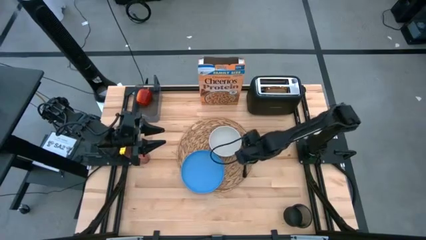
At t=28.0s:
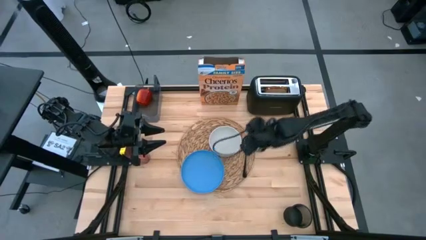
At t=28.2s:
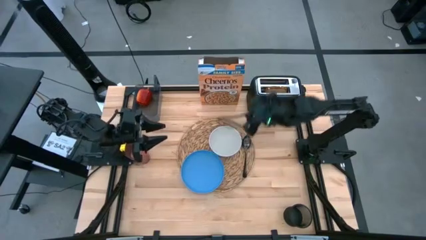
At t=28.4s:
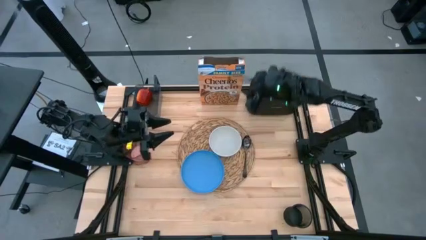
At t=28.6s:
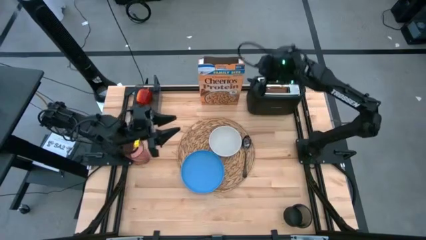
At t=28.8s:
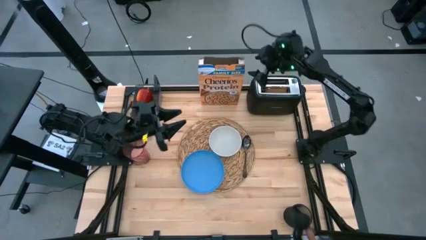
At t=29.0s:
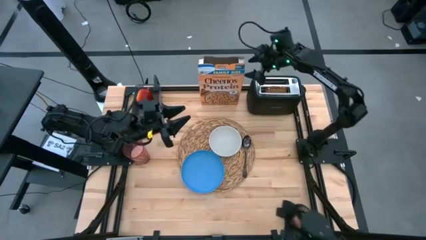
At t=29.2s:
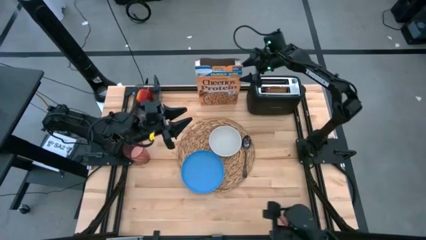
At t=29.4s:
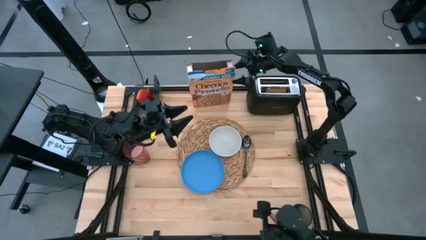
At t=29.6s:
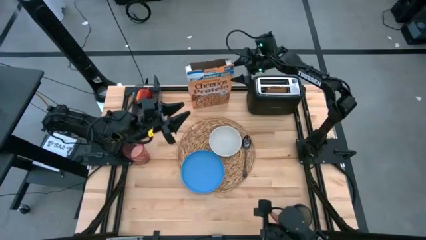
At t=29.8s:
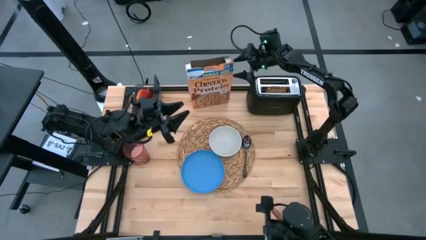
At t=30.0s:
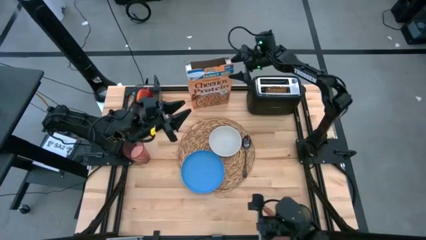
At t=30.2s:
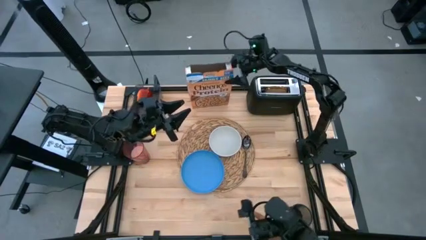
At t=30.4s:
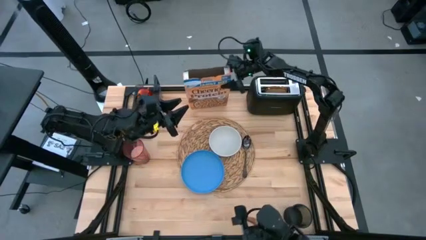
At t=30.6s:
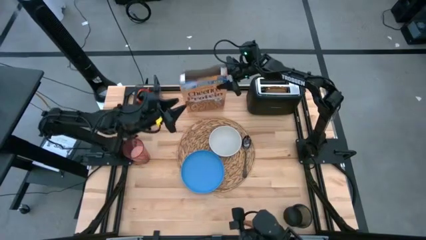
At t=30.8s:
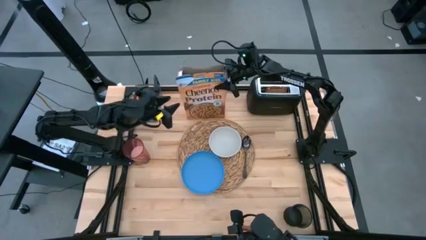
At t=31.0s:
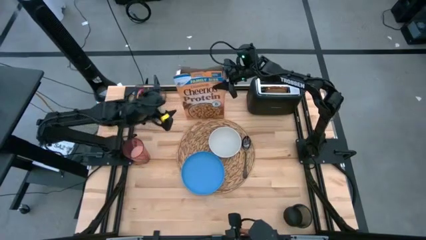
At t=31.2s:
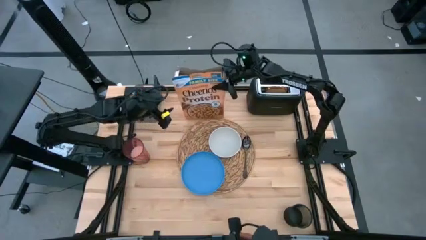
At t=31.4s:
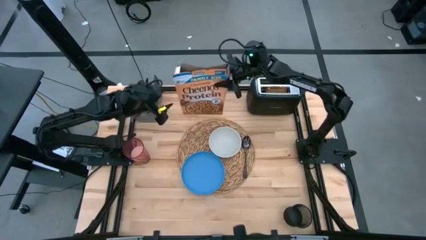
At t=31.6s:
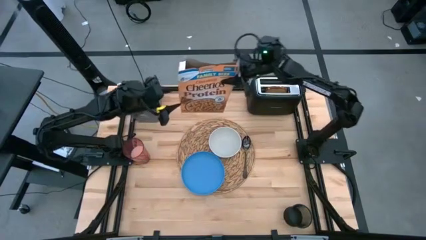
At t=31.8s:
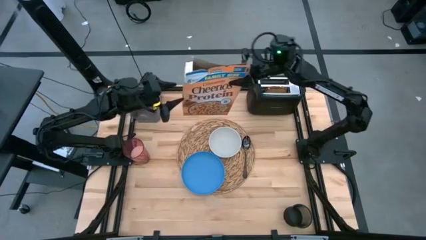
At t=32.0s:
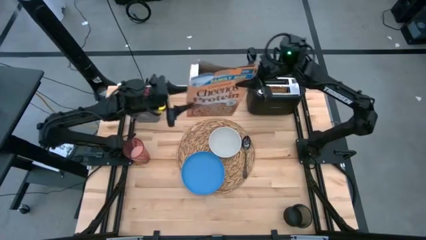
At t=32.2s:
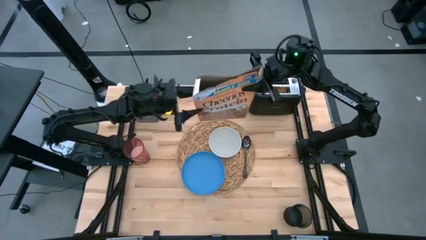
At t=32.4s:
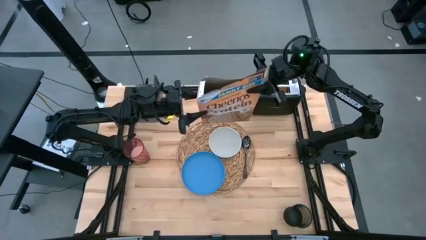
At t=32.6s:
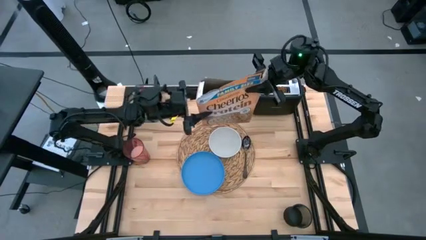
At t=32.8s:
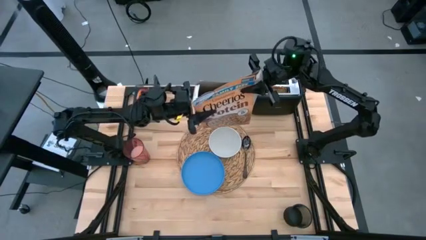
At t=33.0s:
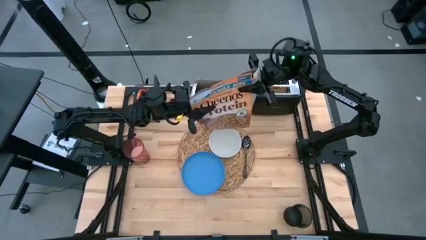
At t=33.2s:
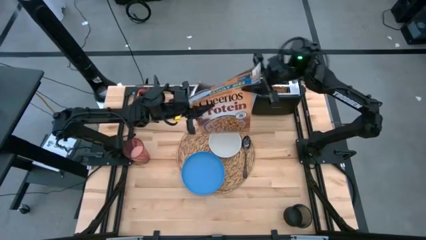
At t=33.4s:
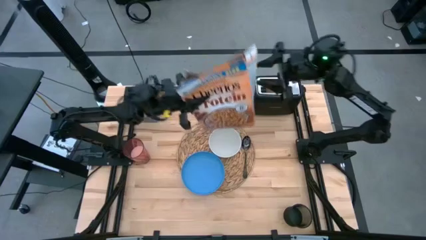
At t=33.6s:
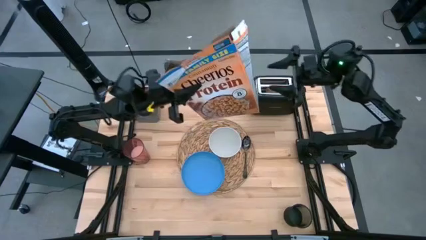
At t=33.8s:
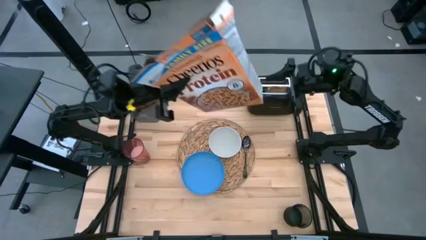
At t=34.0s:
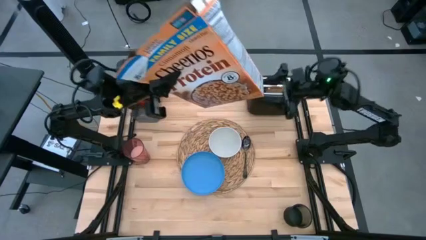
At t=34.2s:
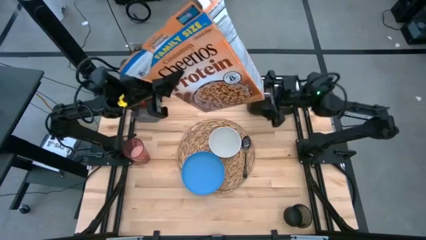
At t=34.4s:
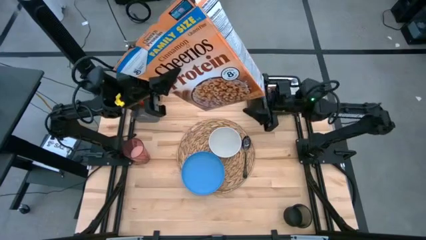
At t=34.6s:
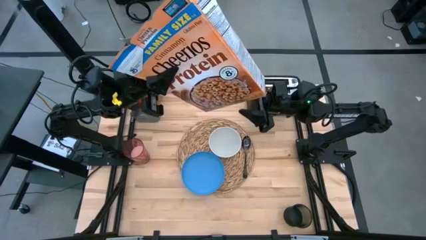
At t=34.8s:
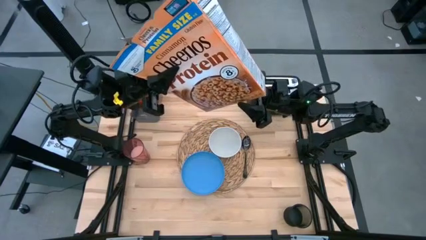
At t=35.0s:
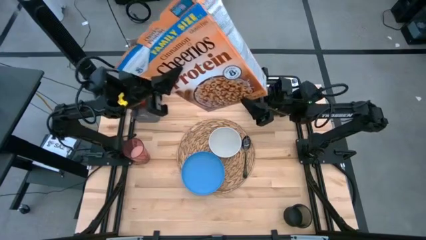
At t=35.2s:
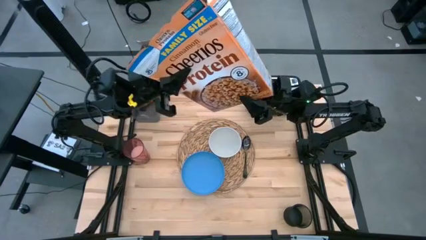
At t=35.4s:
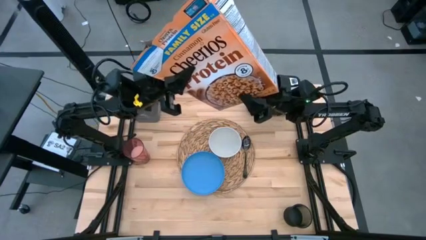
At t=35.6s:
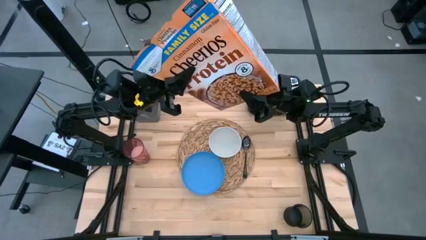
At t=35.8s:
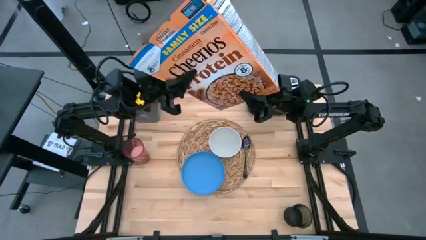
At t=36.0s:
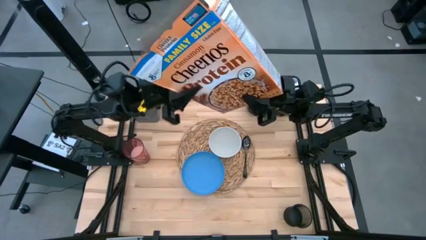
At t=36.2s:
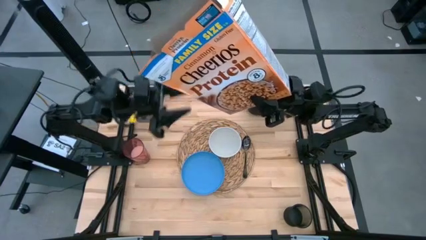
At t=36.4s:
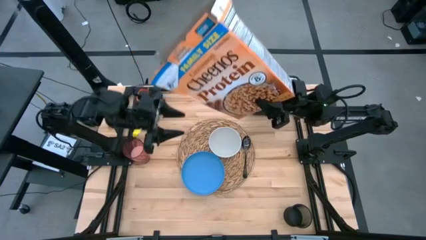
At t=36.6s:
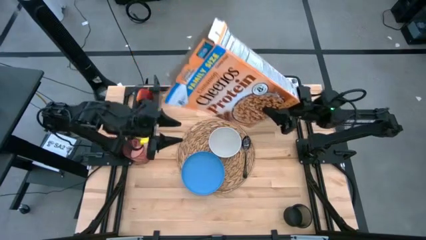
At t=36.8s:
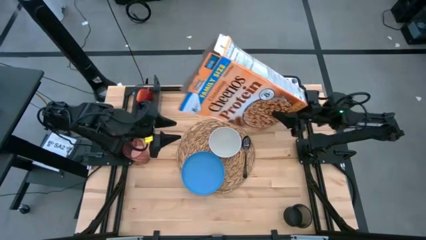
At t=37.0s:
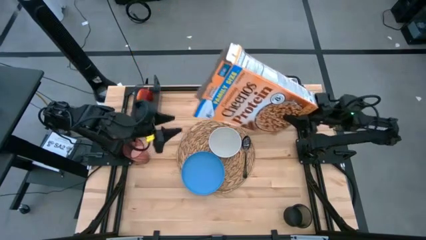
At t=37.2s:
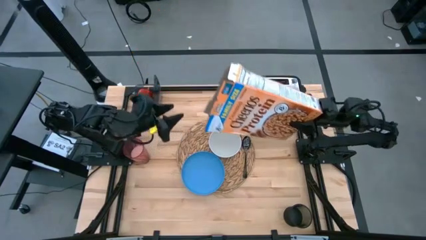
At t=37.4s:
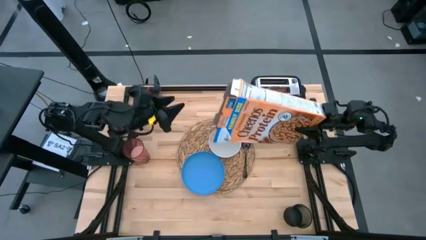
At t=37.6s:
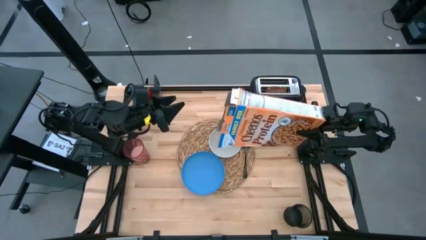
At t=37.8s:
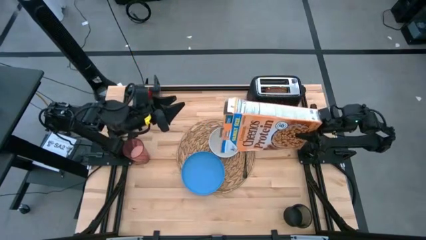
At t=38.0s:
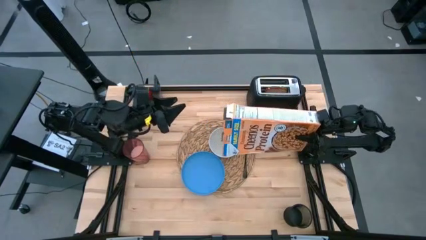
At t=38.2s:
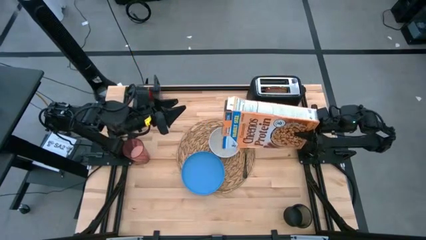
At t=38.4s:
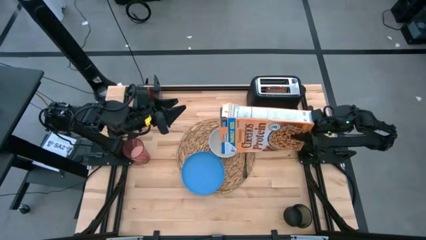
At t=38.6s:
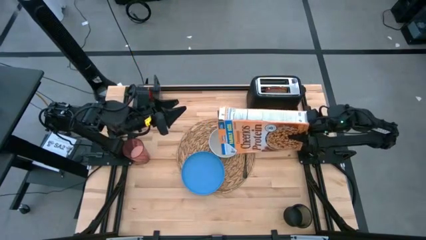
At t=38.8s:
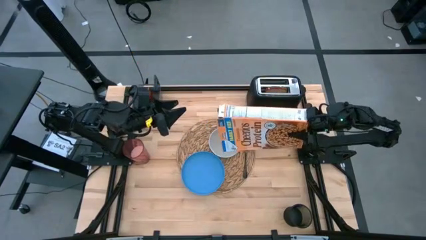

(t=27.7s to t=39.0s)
Task: Arrange a breakfast setting
Pour the cereal into the white bowl

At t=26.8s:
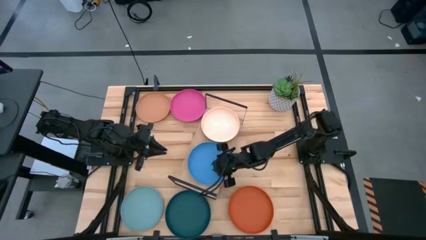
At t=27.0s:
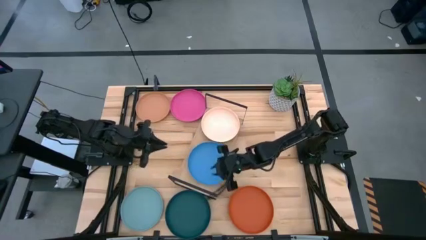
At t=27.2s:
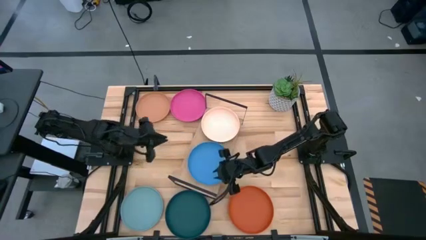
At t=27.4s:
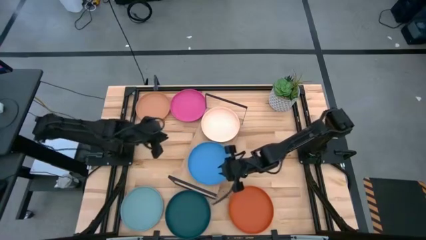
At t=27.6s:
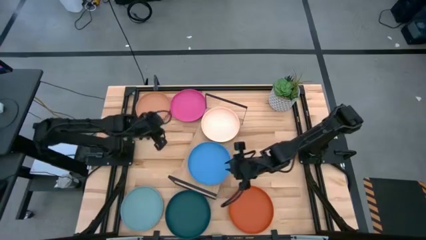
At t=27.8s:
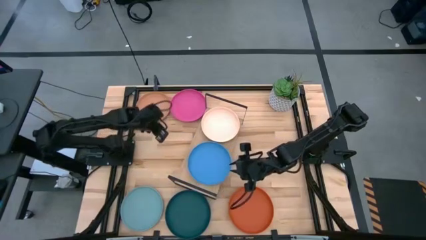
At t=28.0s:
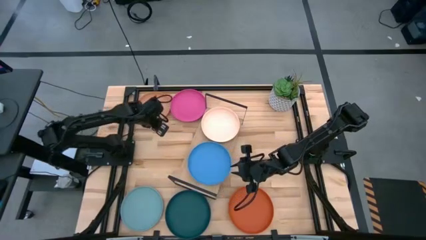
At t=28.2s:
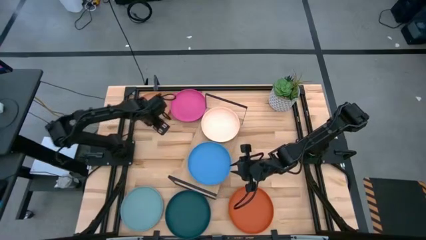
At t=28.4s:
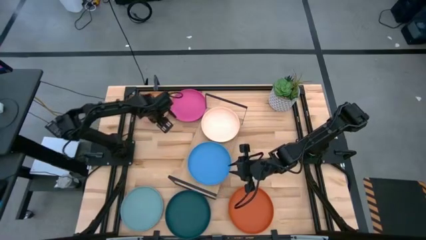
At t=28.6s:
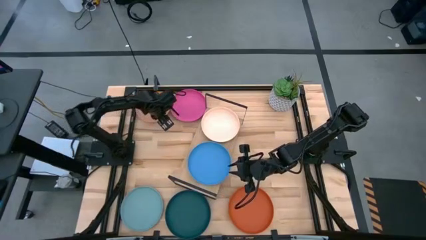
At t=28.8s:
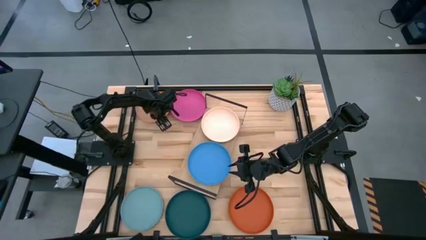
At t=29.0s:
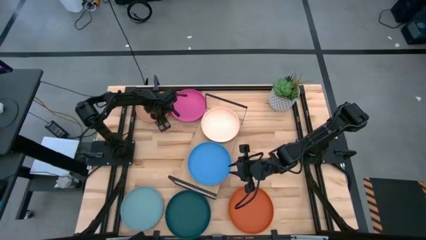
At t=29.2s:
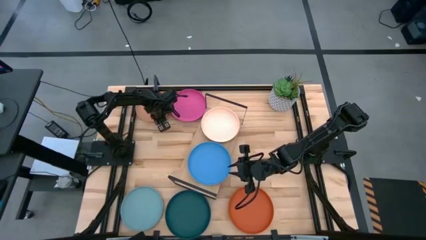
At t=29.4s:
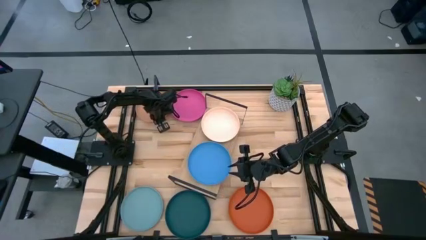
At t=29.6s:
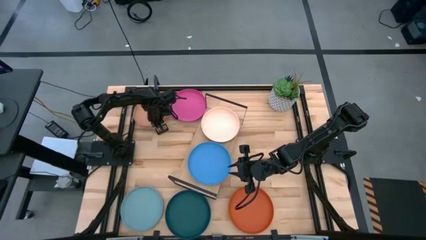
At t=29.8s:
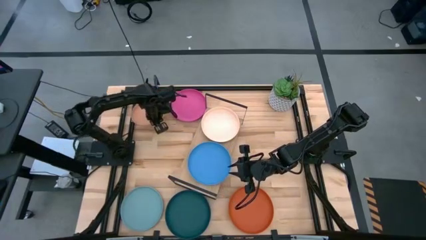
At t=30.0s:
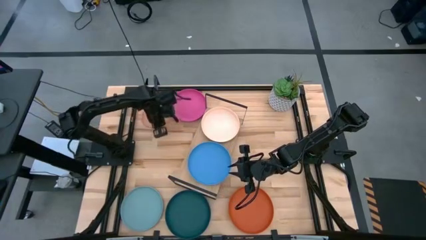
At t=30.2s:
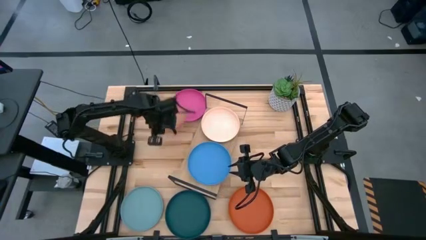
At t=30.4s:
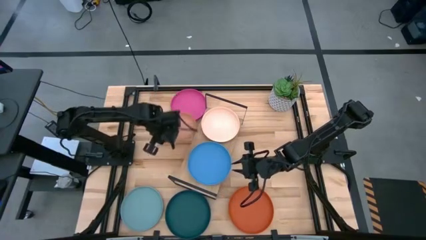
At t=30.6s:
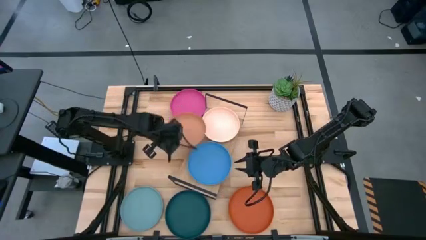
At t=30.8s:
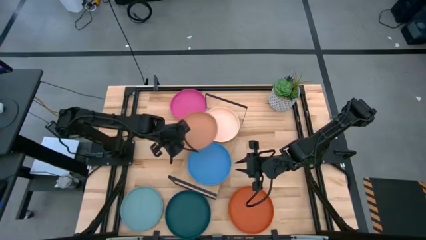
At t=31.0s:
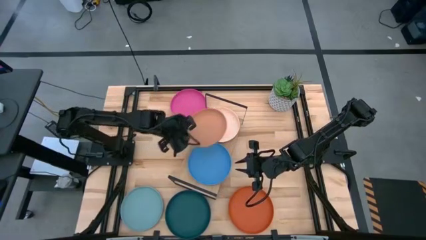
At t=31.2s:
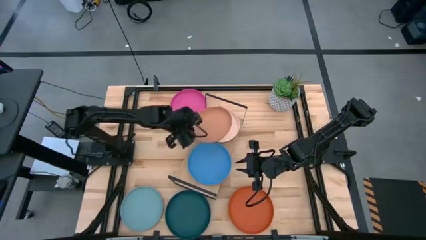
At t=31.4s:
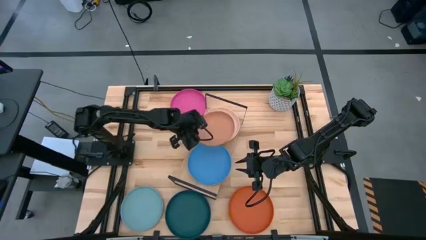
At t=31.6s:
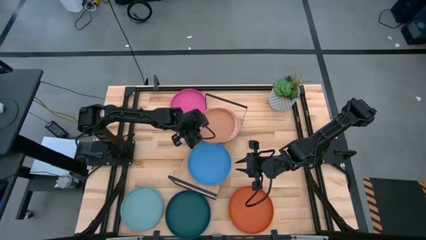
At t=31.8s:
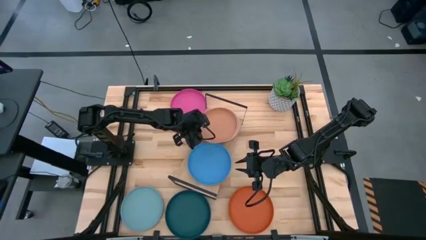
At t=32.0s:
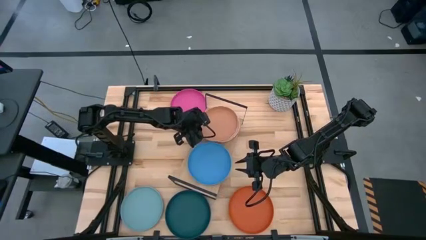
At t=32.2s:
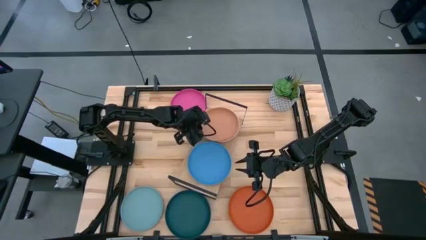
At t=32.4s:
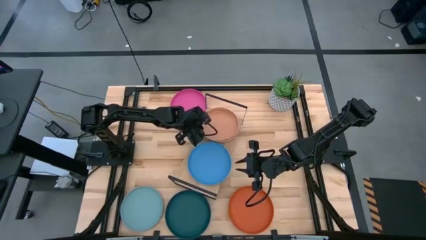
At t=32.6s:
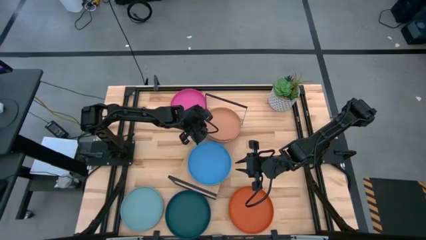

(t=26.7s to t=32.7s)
Task: Place and stack plates onto a shelf
Stack the brown plate on top of the light orange plate on the shelf
